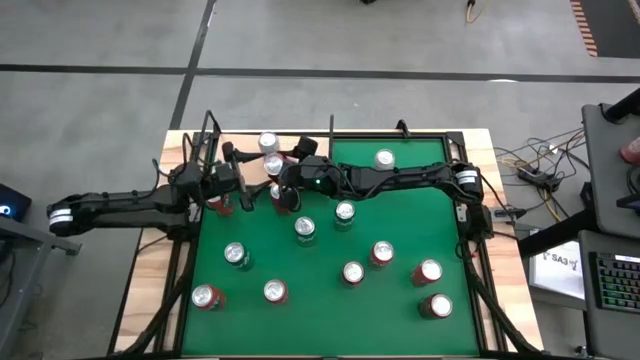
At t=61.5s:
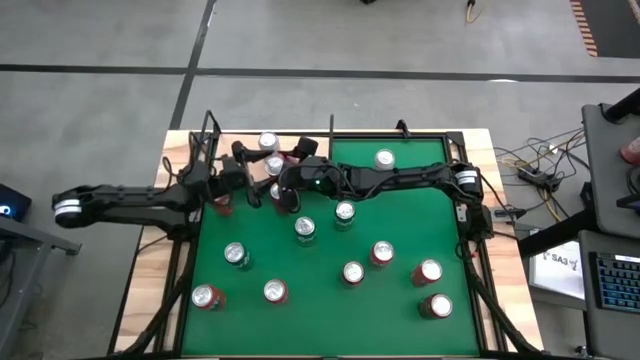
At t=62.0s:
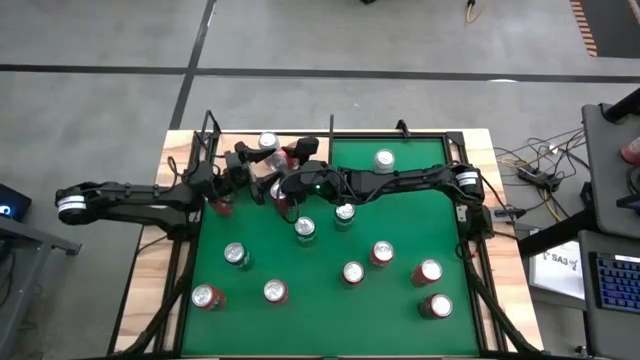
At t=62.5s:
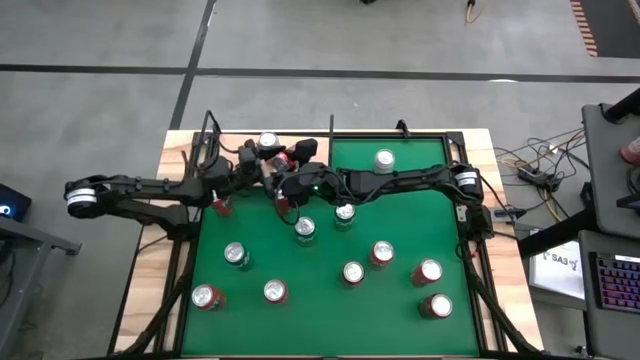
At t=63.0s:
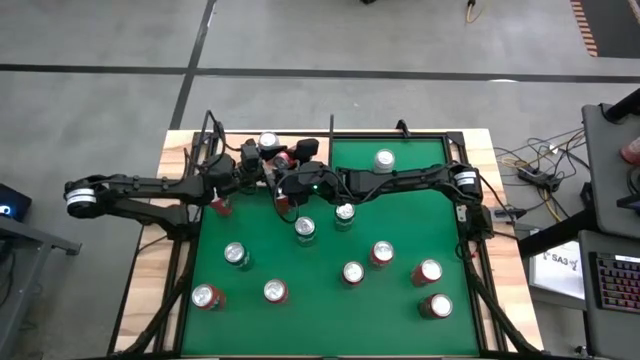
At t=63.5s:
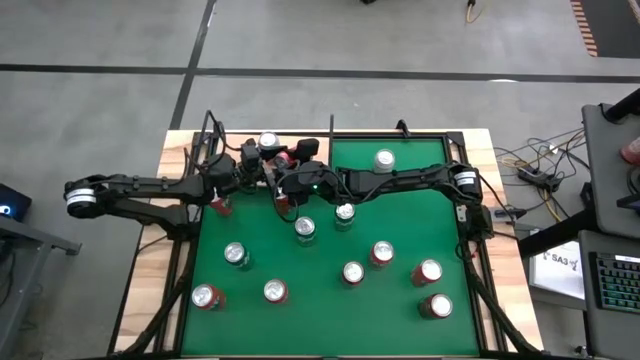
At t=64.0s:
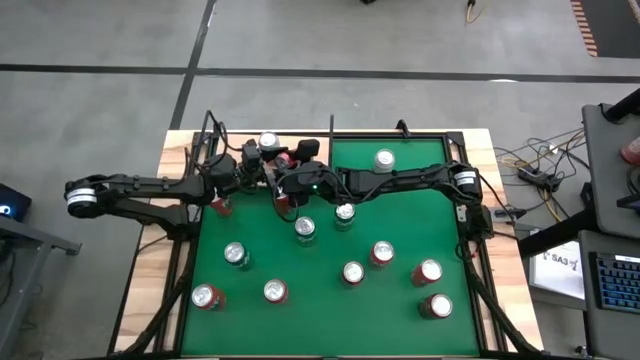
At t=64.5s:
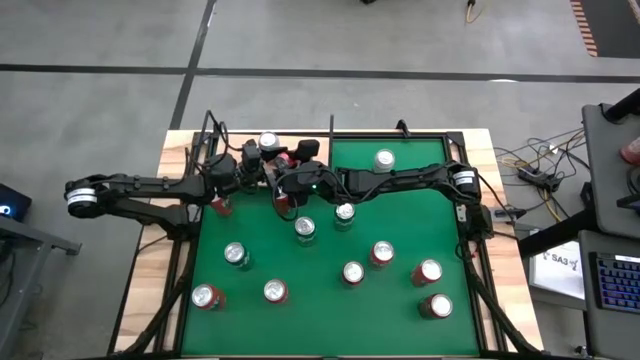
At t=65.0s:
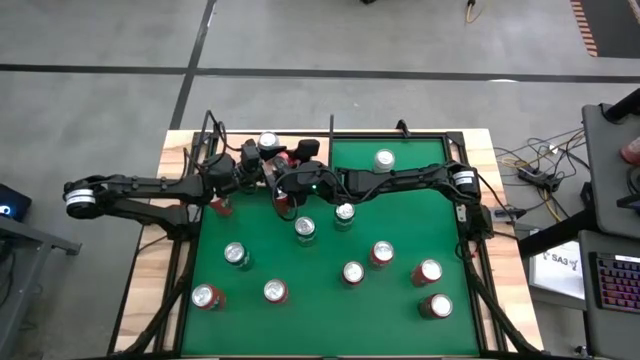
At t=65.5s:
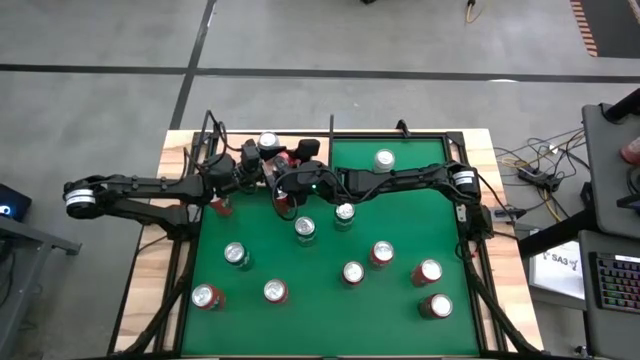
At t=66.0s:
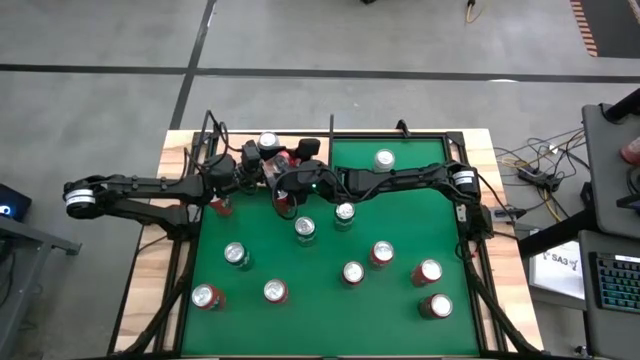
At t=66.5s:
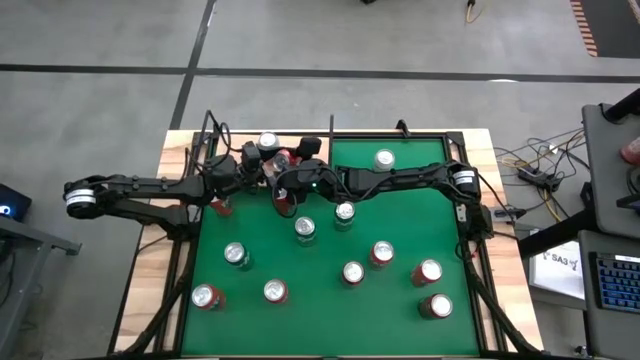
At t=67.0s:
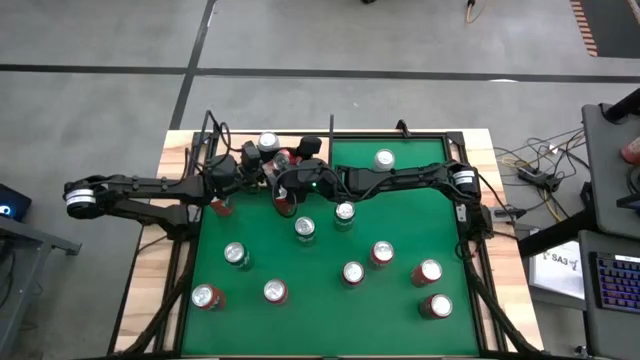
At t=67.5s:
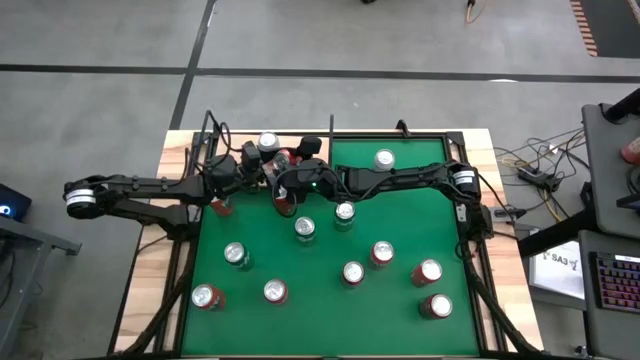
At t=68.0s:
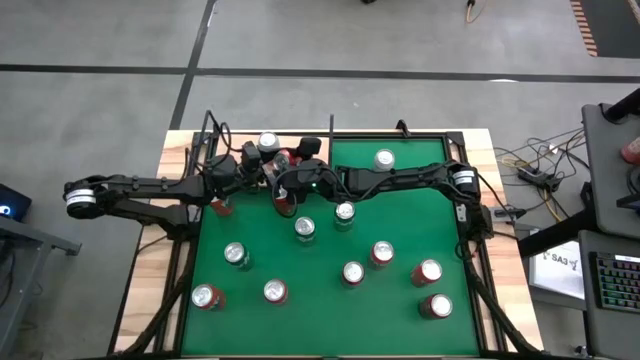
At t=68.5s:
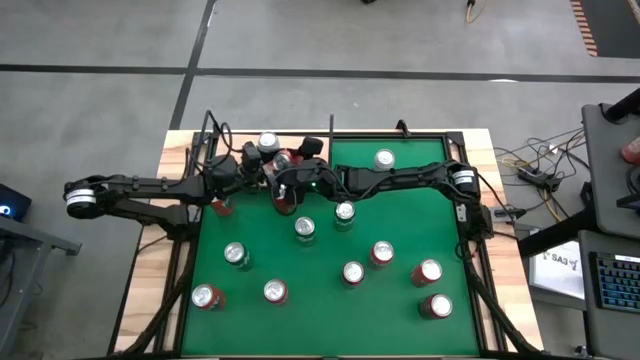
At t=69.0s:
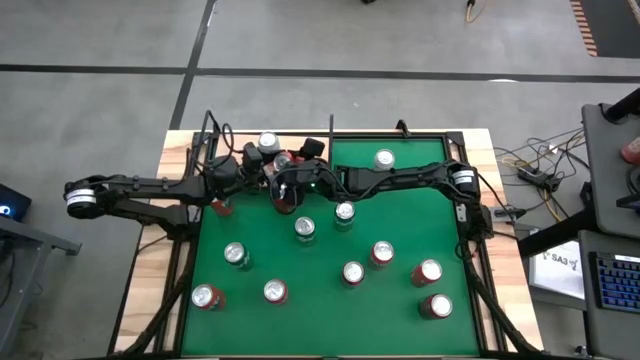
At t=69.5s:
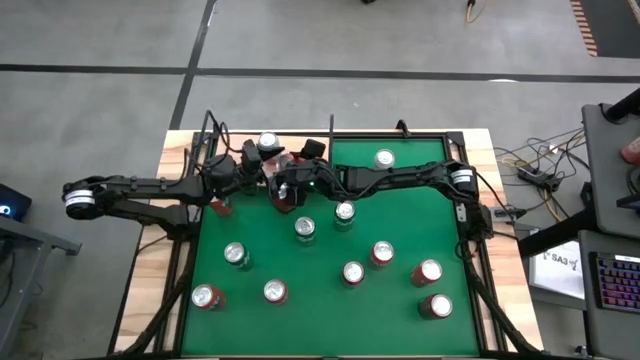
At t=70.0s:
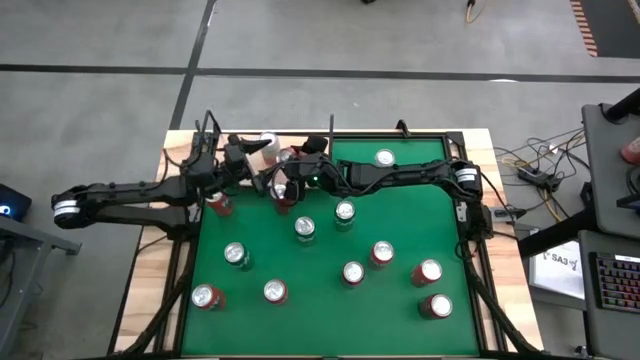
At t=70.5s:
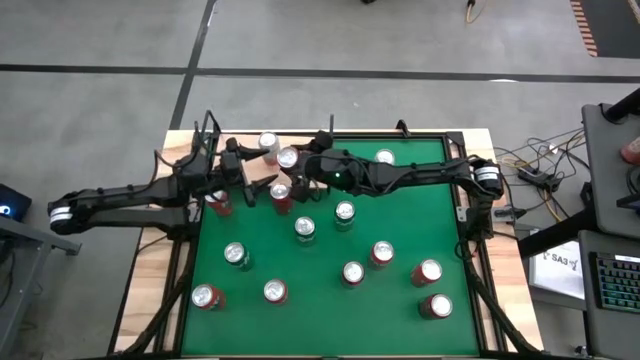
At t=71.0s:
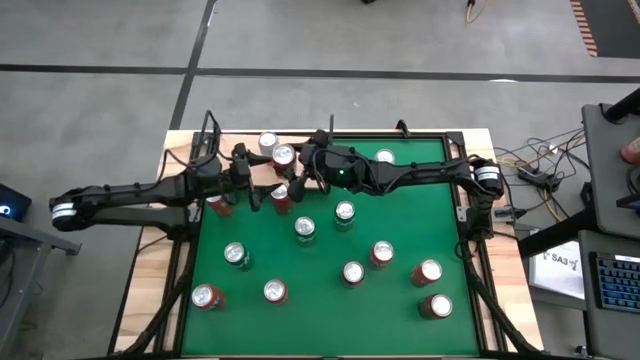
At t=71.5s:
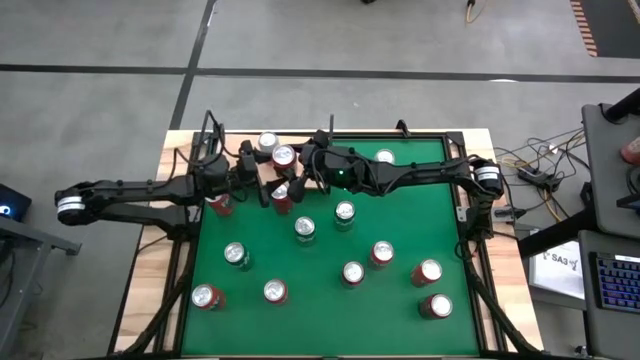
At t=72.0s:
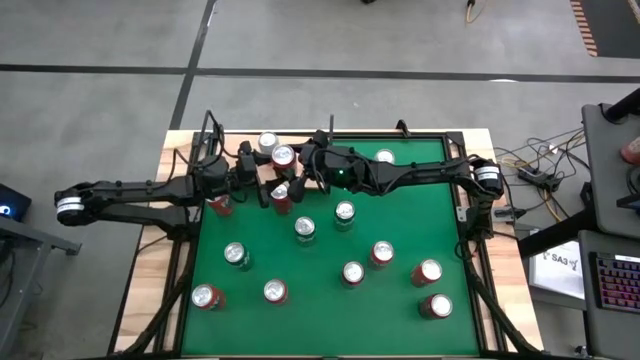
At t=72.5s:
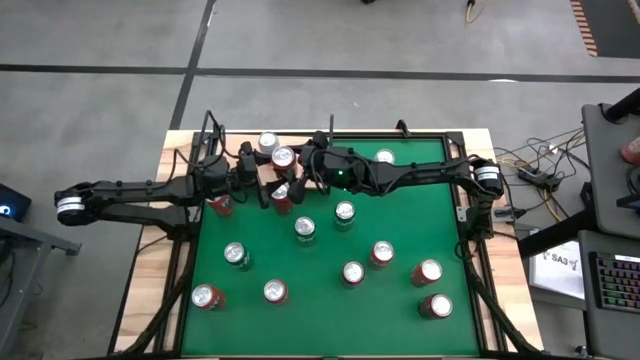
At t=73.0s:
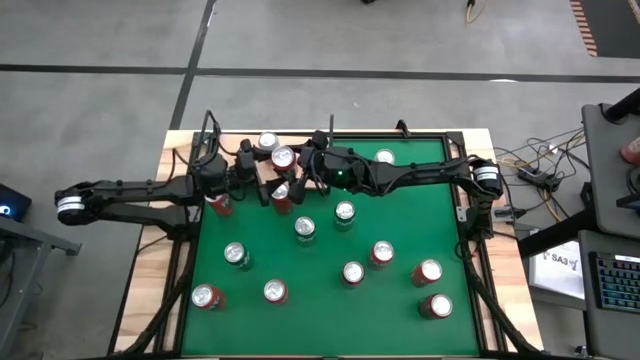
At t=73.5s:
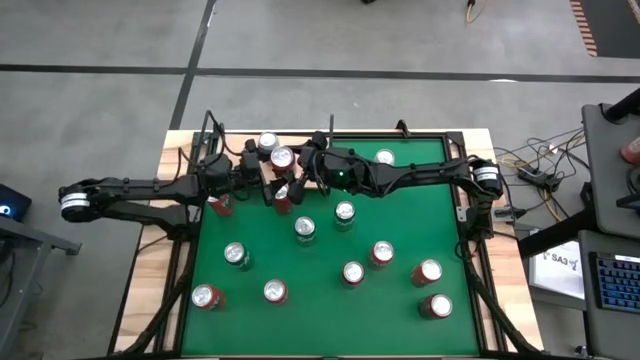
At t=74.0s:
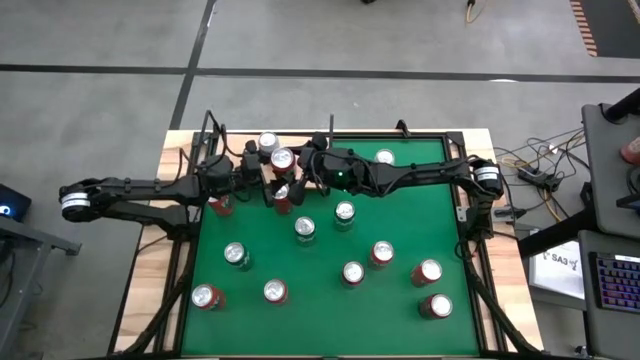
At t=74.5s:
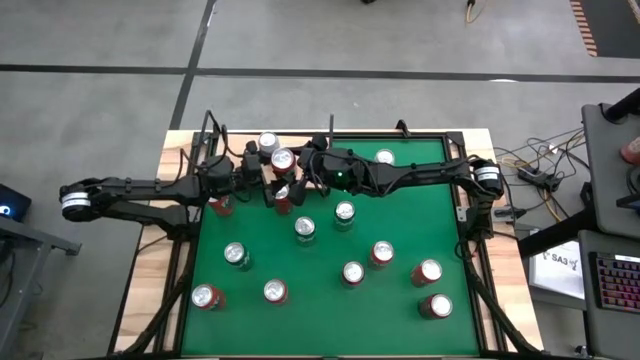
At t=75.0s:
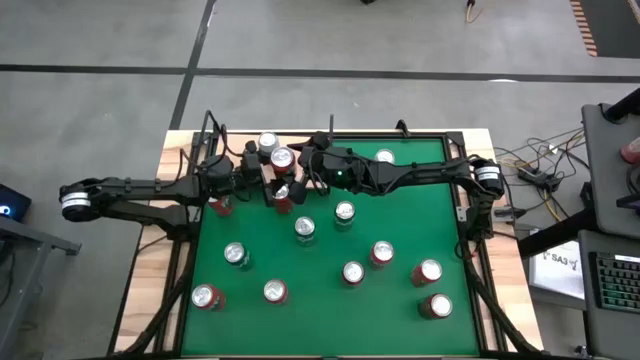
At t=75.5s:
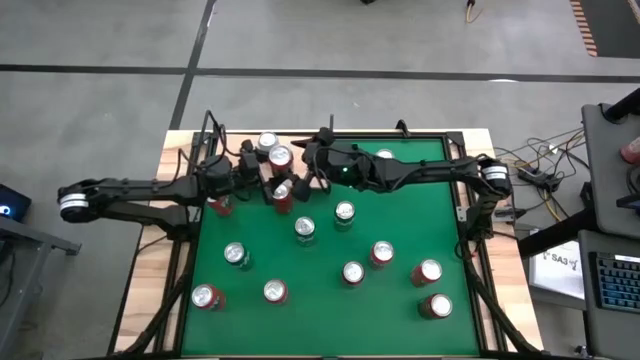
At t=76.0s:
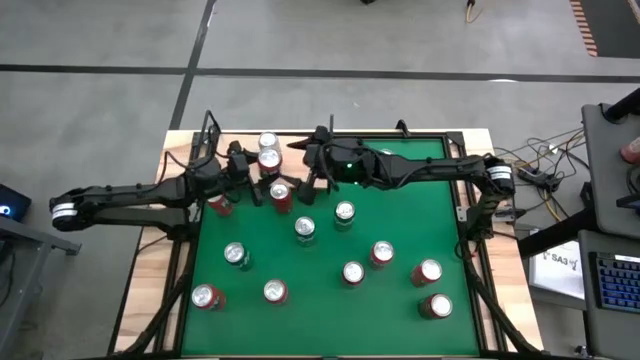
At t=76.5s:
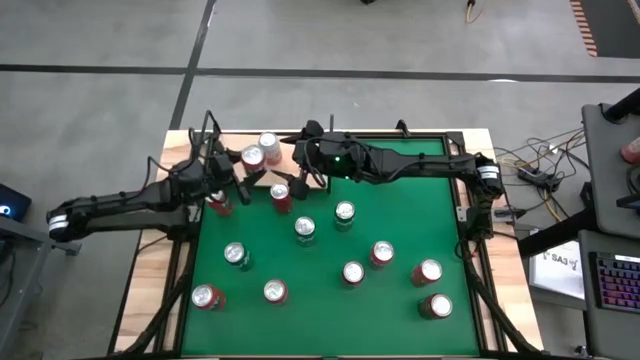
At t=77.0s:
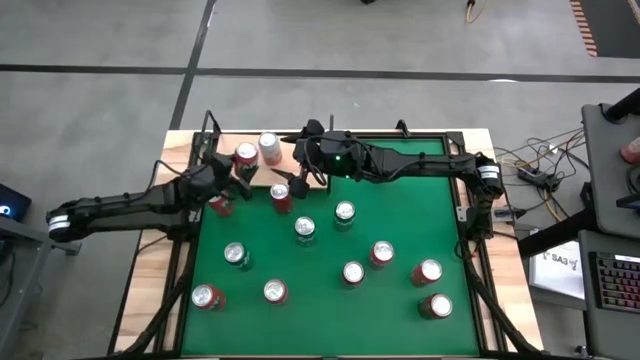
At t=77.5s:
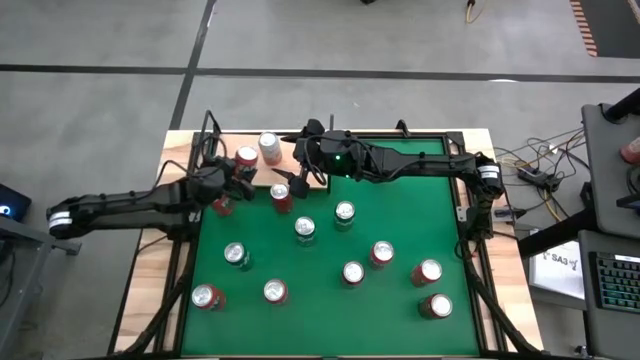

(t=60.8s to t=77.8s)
Task: Place canned beverage on shelf
Put the red soda can on the shelf
